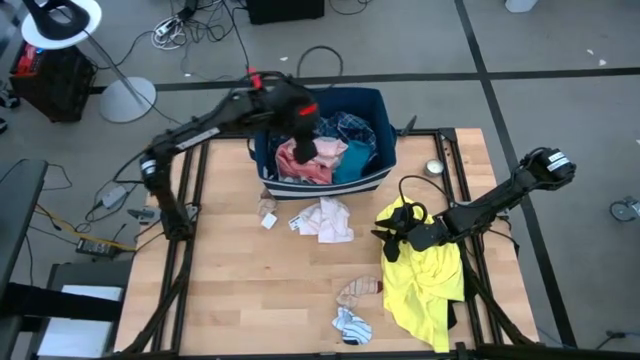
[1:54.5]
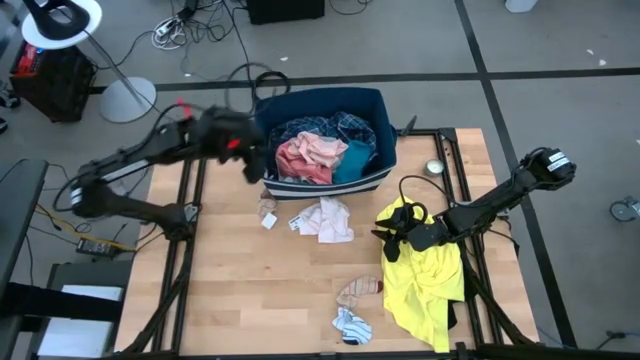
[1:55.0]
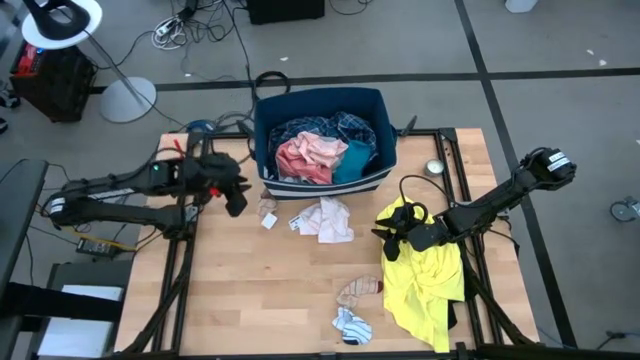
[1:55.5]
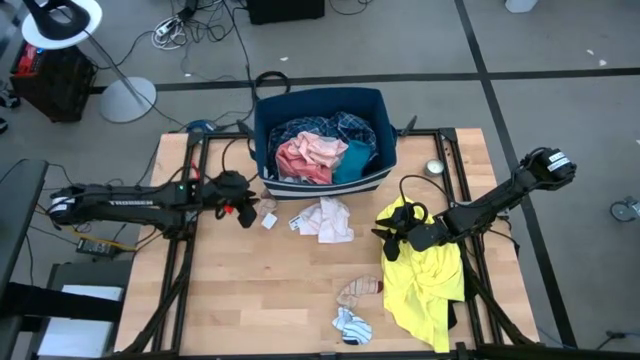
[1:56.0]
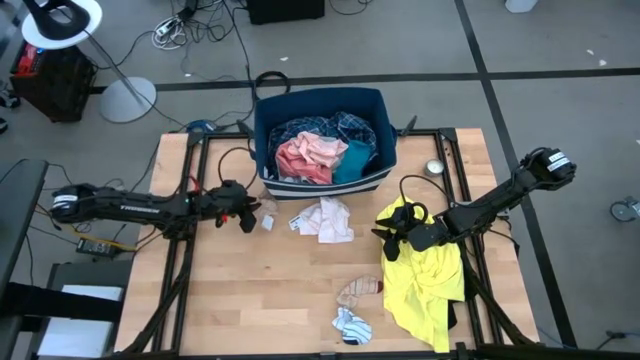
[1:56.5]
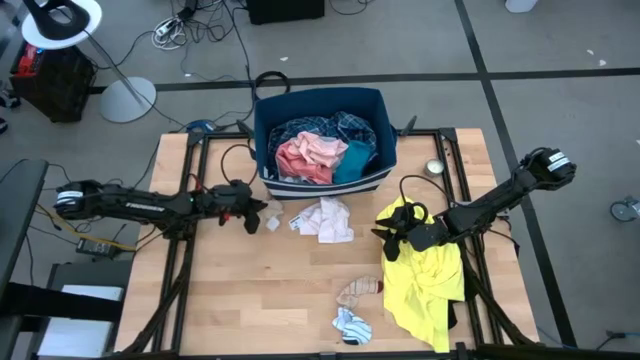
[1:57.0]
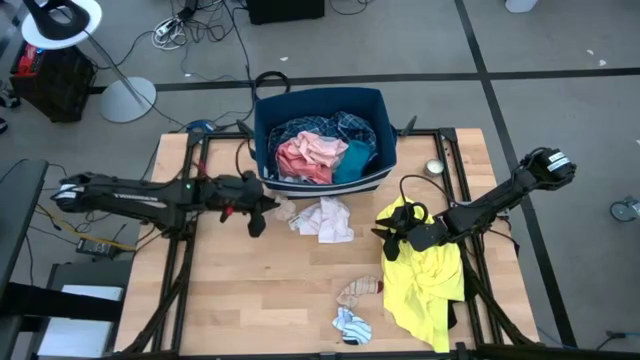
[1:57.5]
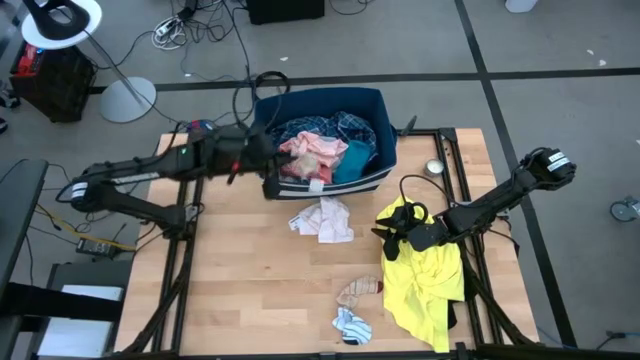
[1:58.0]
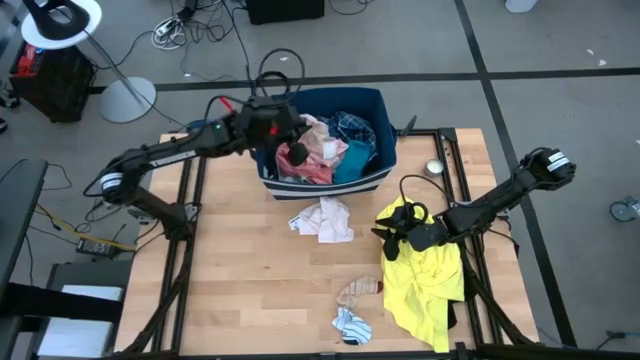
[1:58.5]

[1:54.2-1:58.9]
Task: Sort clothes
Put the top pink striped sock into the blue bin

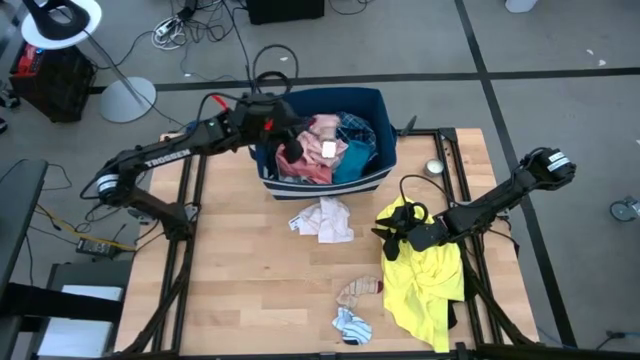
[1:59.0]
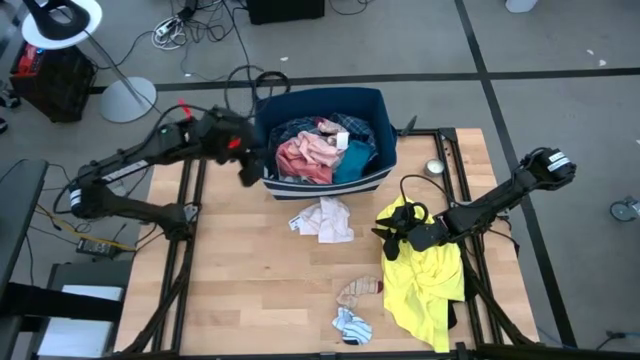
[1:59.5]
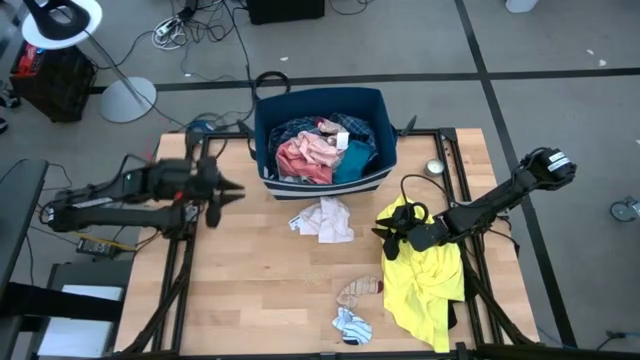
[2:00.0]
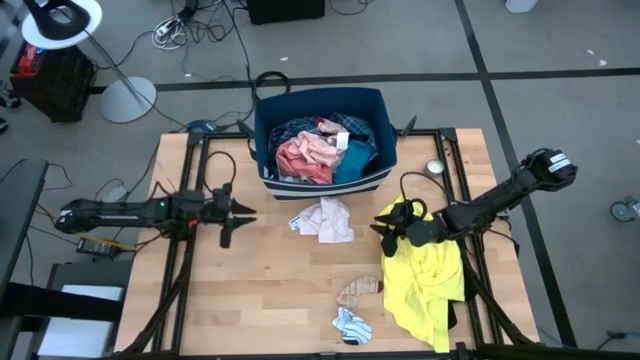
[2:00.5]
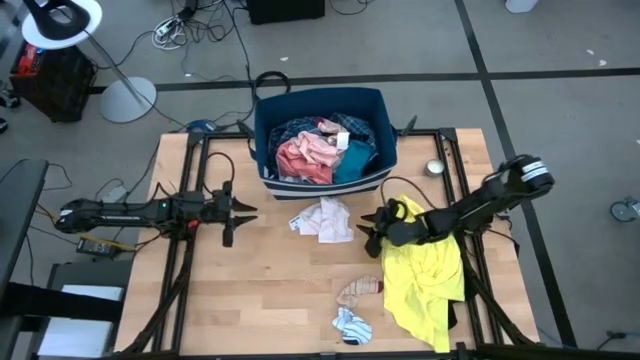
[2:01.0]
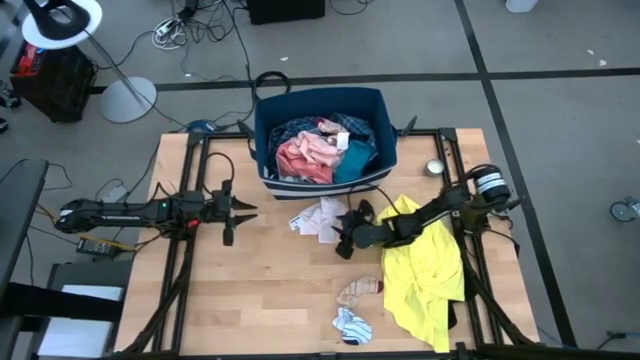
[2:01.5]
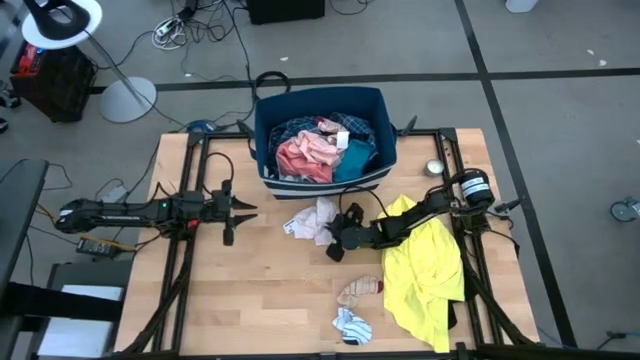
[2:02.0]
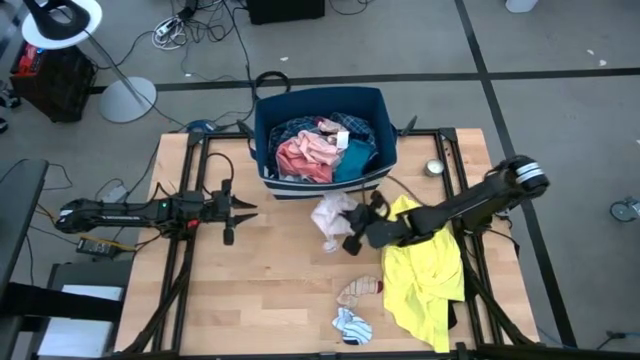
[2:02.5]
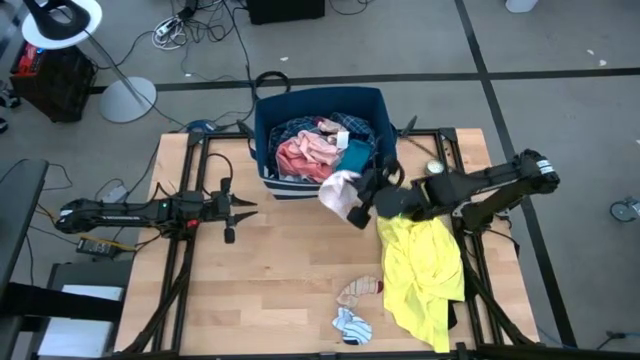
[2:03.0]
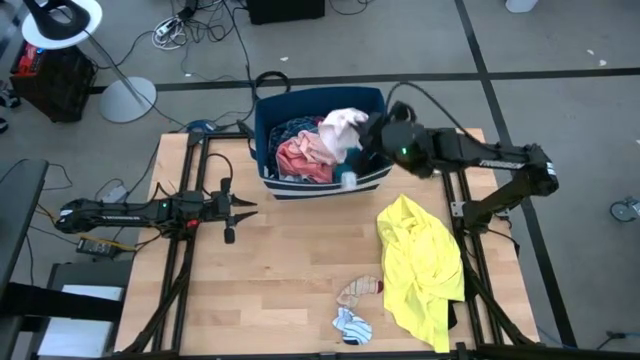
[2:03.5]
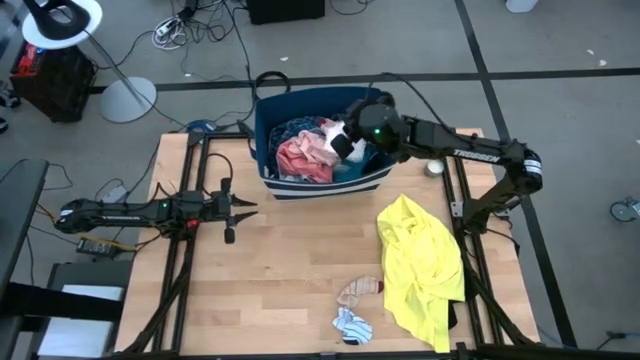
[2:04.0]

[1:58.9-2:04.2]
Put the light pink underwear into the blue bin

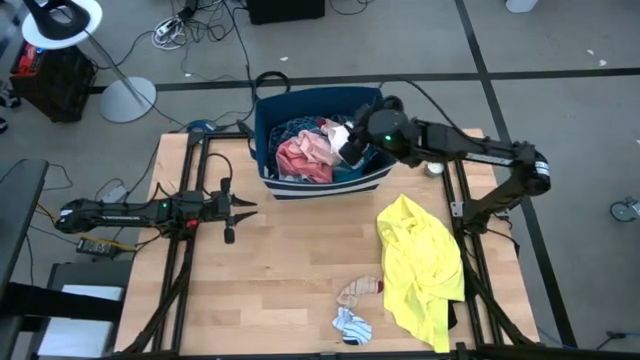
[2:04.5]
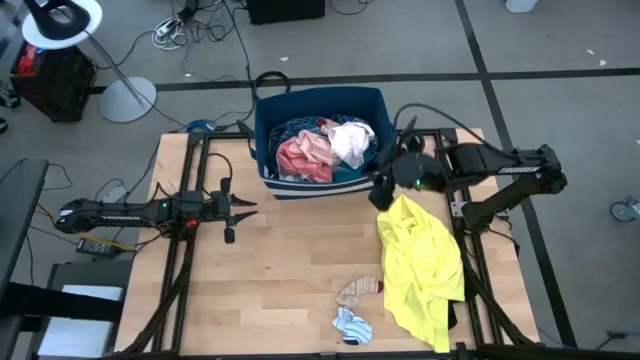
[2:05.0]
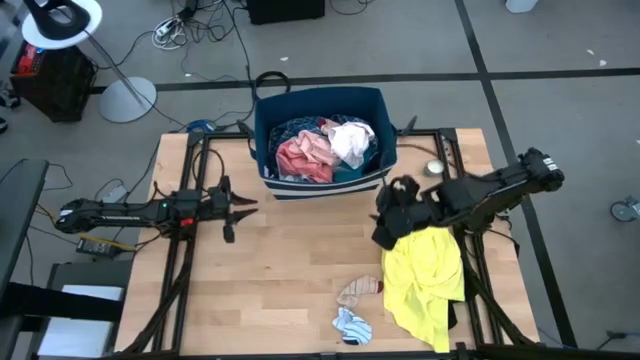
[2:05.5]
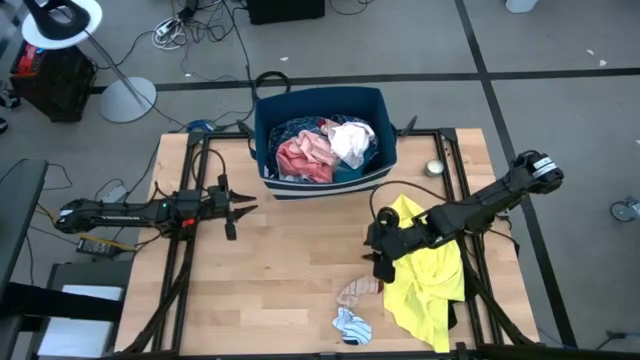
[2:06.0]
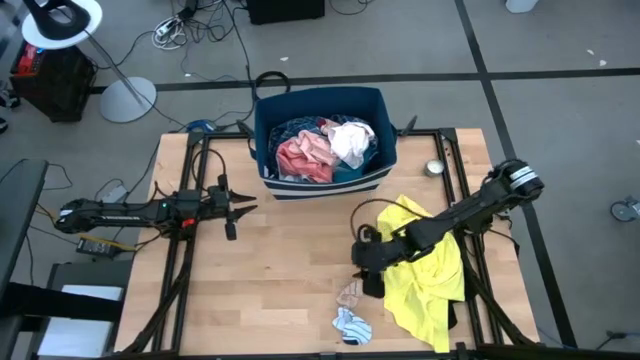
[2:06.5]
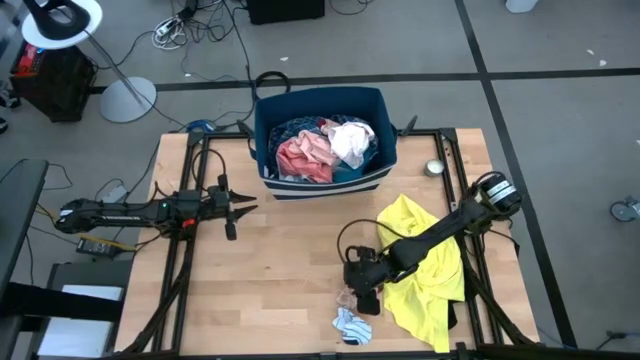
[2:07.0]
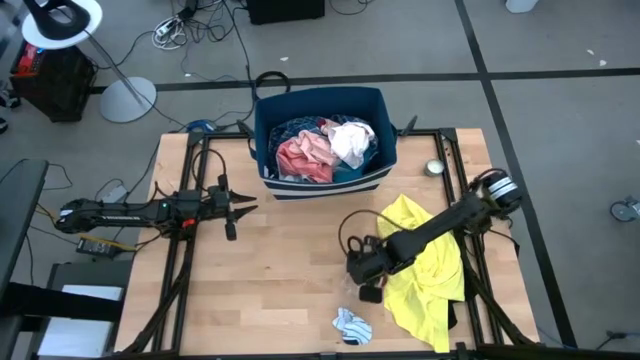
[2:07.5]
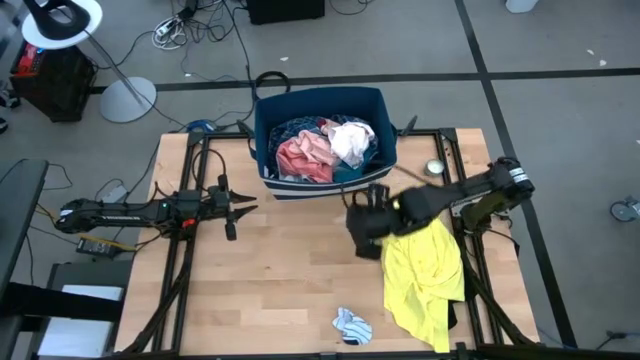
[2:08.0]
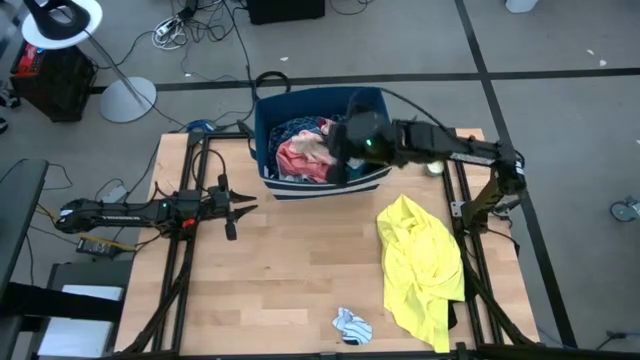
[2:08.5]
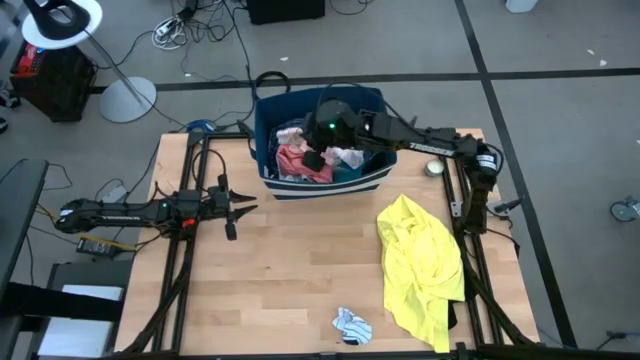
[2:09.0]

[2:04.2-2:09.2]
Put the pink striped sock into the blue bin

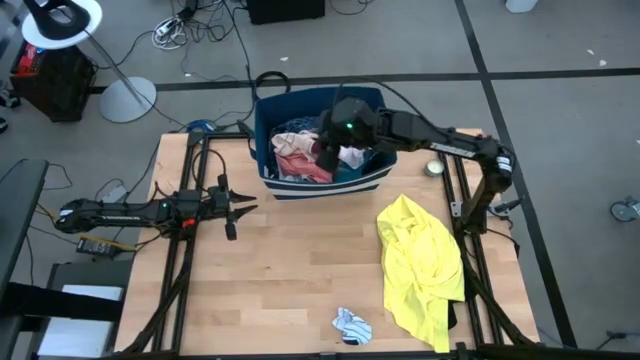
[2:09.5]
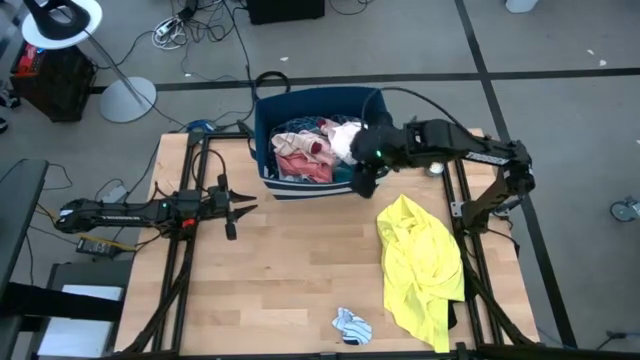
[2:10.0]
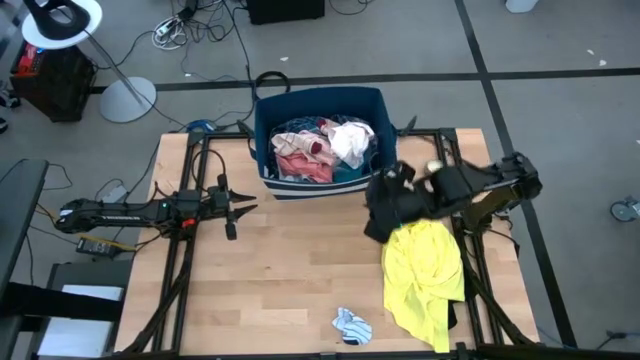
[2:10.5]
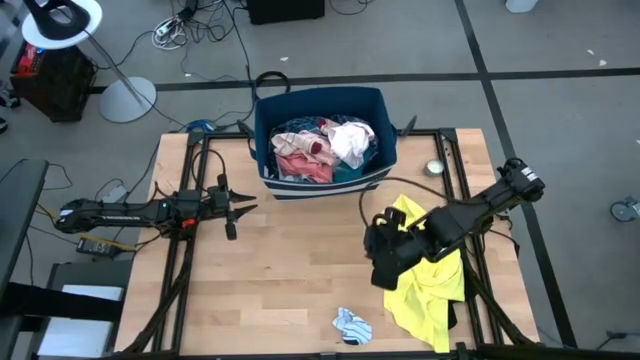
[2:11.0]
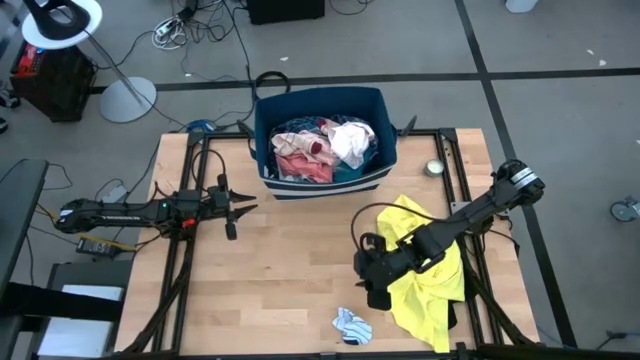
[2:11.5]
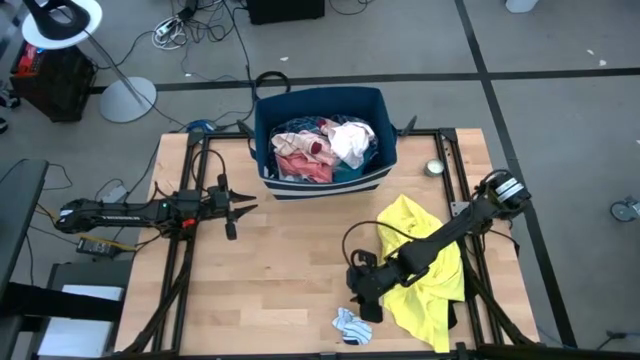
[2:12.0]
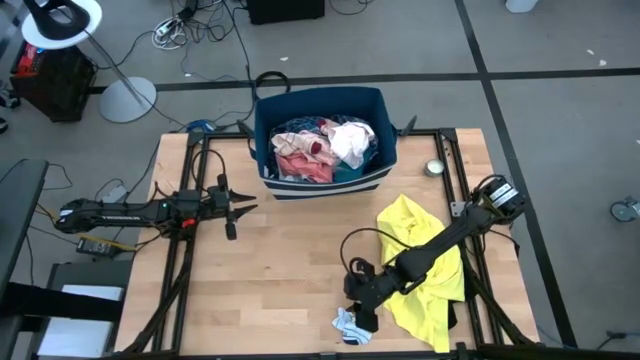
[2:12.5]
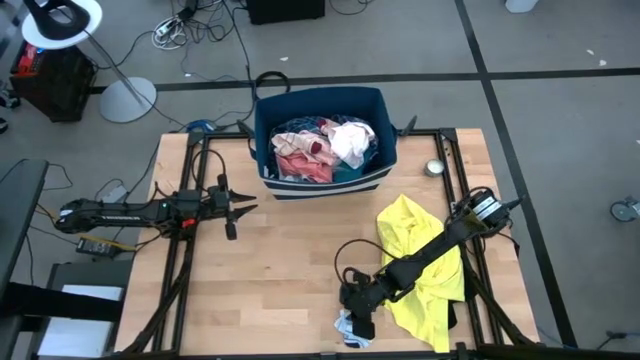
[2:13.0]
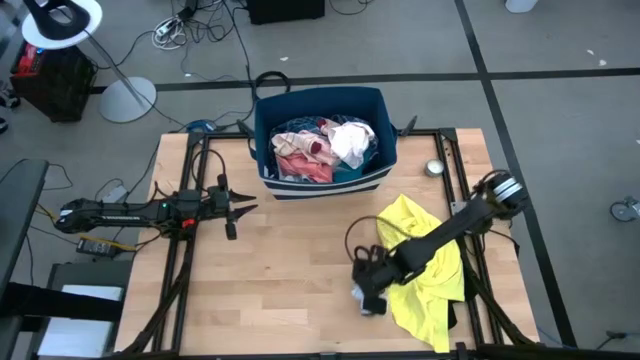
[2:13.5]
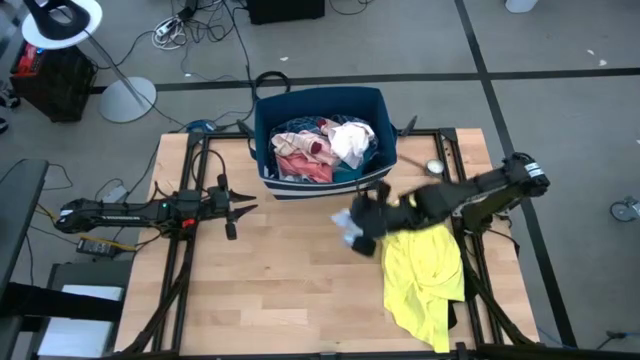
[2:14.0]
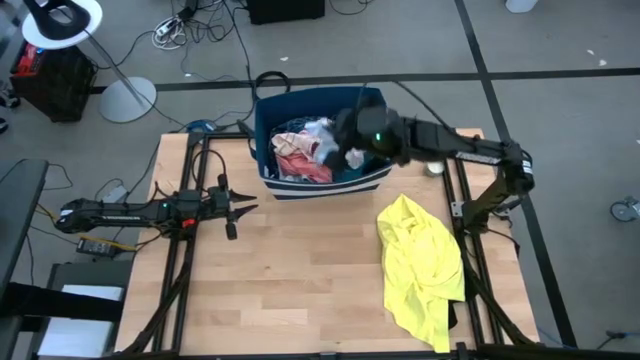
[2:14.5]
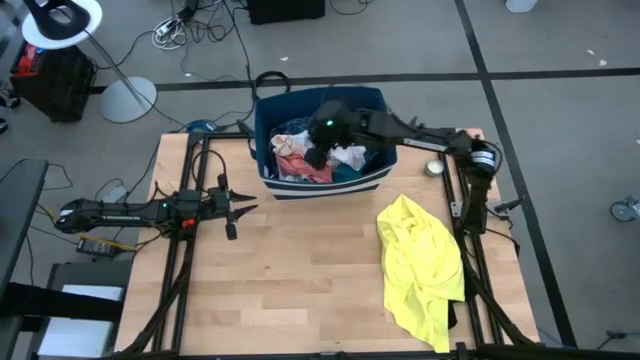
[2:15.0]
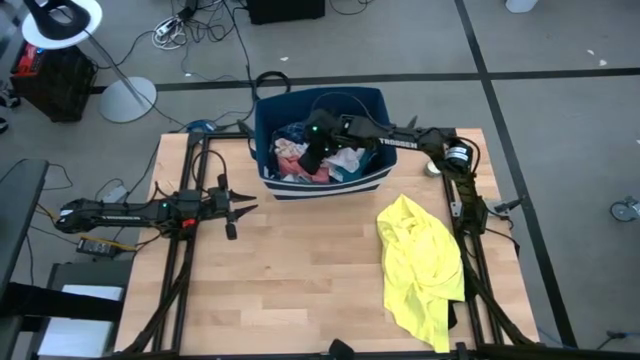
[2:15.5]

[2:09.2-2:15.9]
Put the white striped sock into the blue bin
